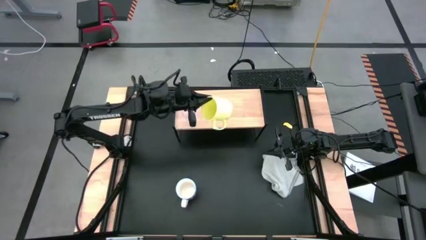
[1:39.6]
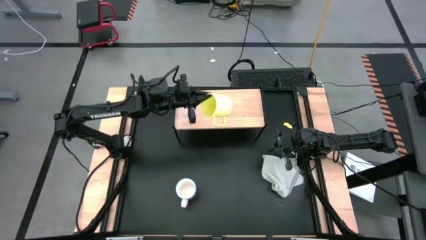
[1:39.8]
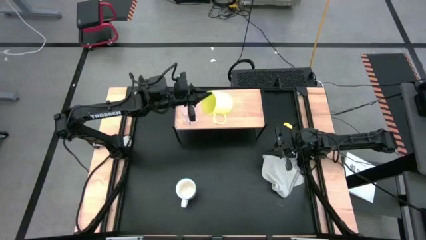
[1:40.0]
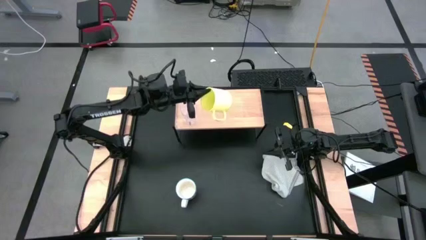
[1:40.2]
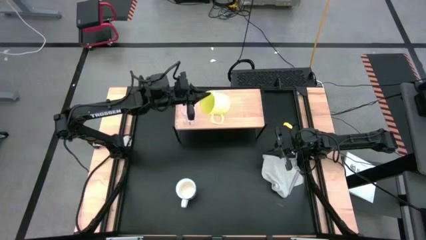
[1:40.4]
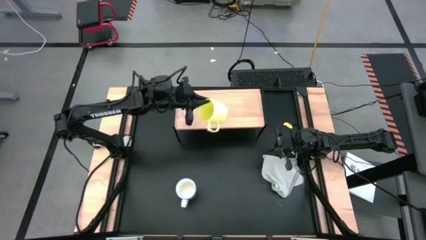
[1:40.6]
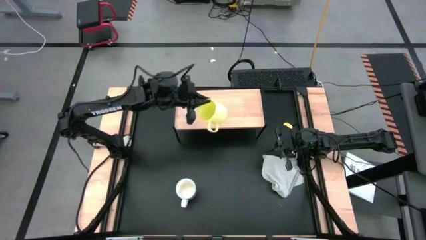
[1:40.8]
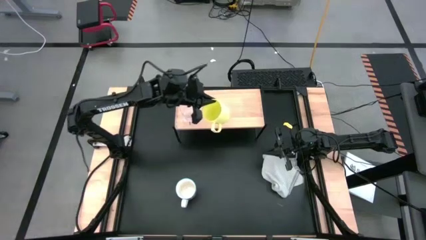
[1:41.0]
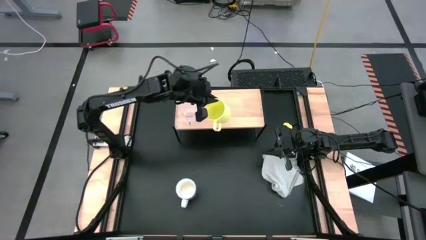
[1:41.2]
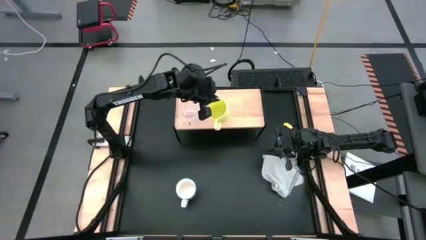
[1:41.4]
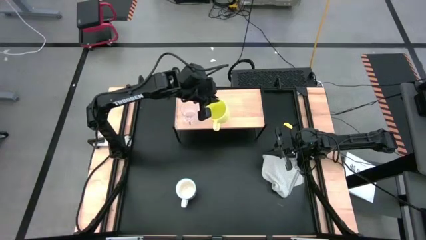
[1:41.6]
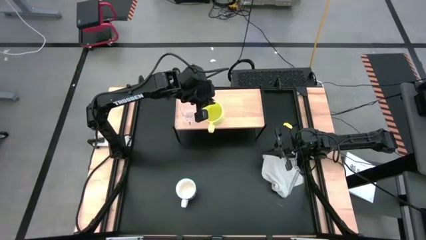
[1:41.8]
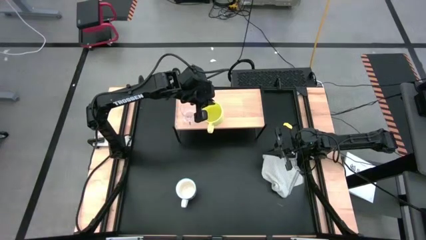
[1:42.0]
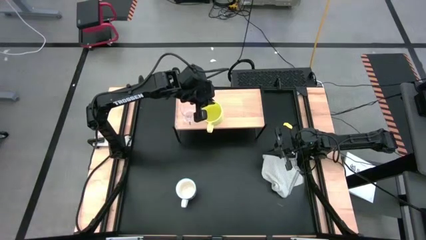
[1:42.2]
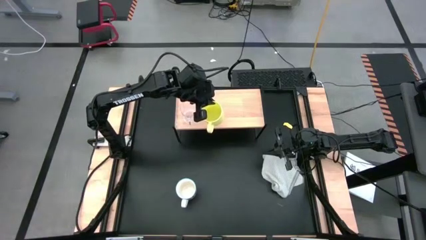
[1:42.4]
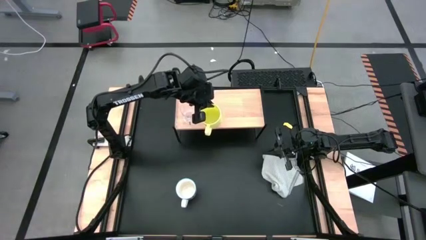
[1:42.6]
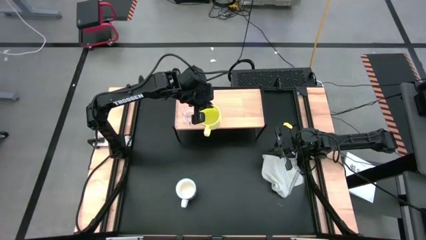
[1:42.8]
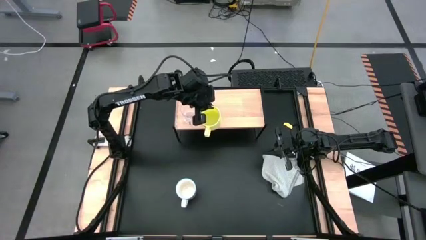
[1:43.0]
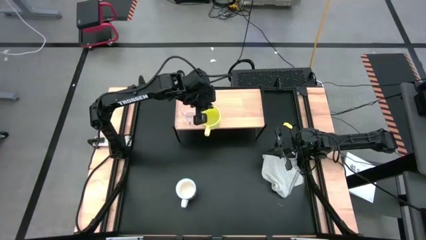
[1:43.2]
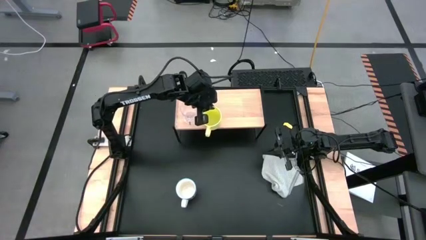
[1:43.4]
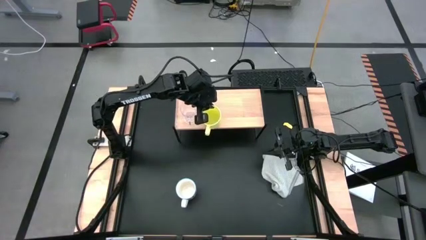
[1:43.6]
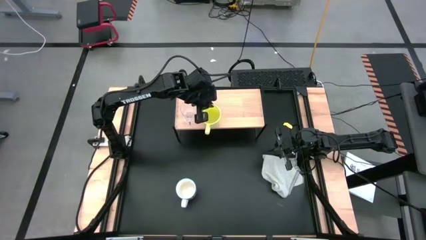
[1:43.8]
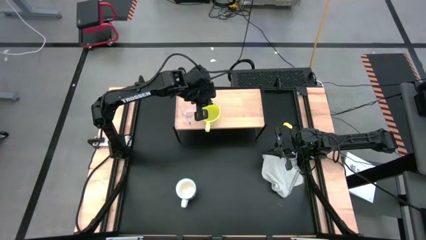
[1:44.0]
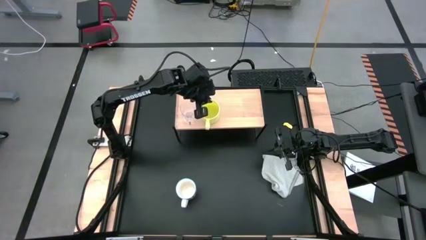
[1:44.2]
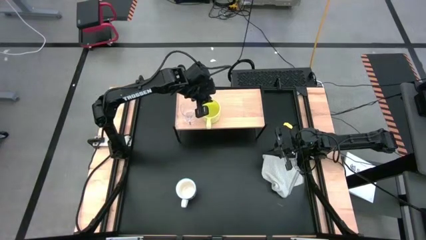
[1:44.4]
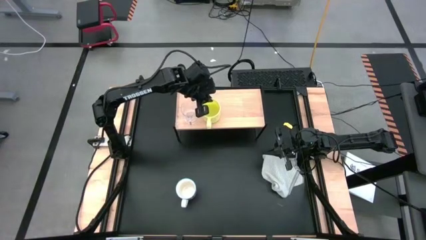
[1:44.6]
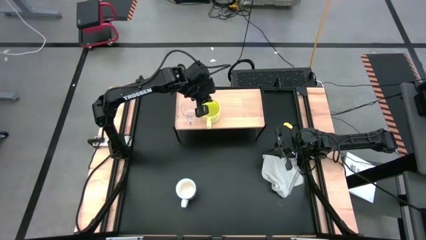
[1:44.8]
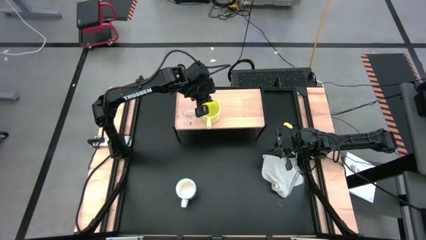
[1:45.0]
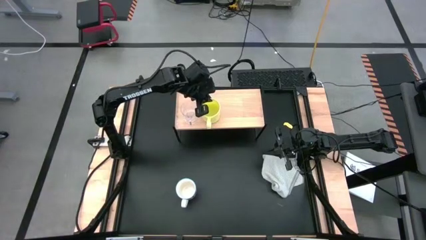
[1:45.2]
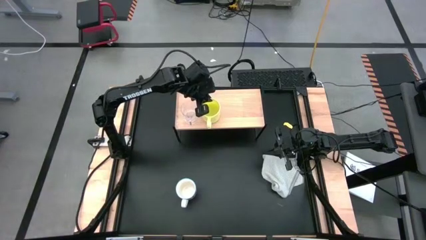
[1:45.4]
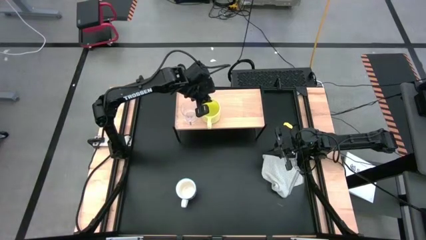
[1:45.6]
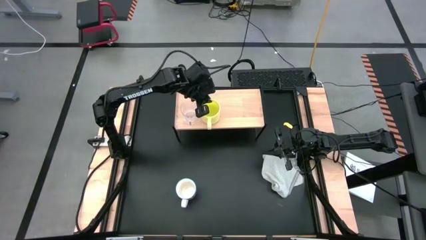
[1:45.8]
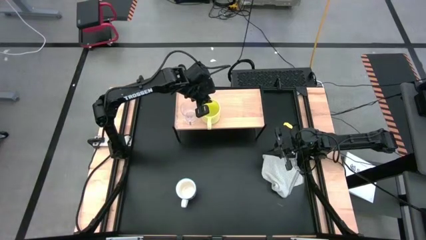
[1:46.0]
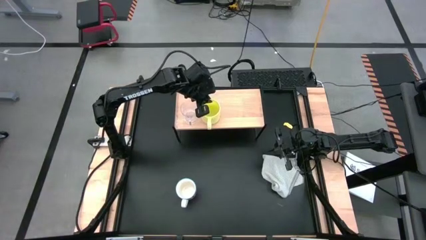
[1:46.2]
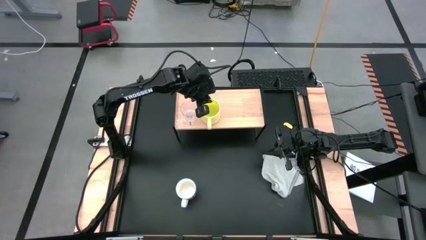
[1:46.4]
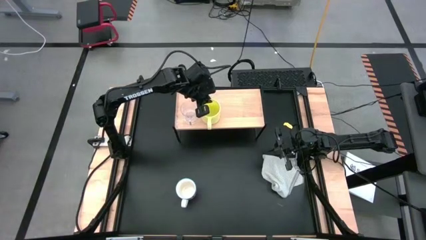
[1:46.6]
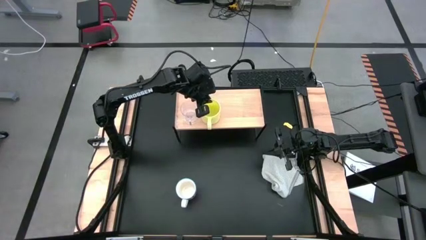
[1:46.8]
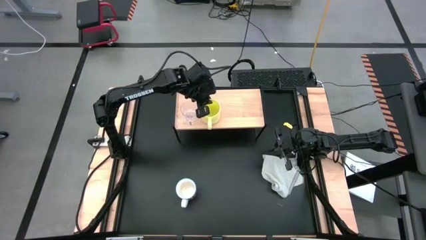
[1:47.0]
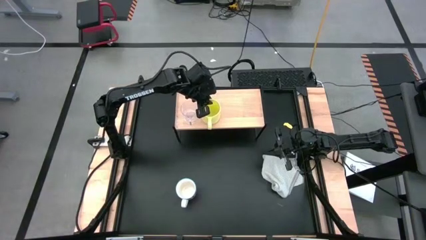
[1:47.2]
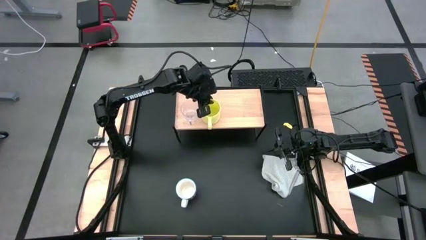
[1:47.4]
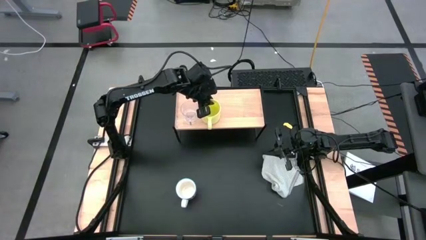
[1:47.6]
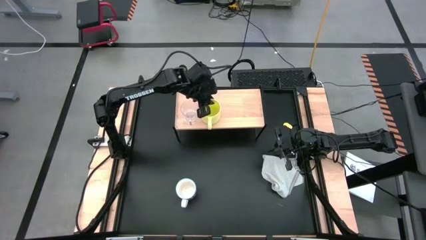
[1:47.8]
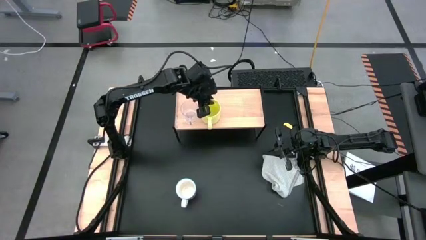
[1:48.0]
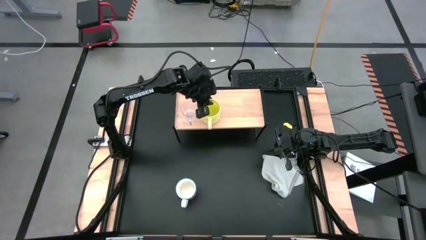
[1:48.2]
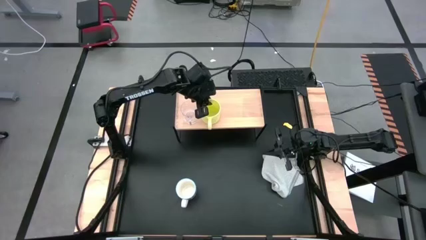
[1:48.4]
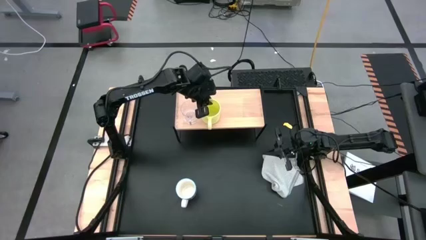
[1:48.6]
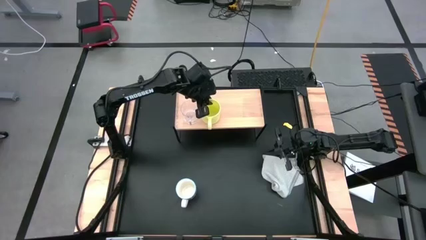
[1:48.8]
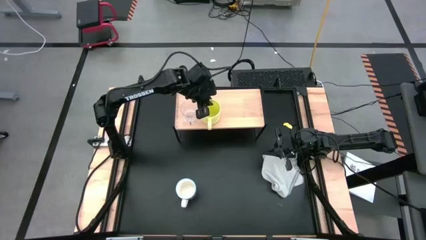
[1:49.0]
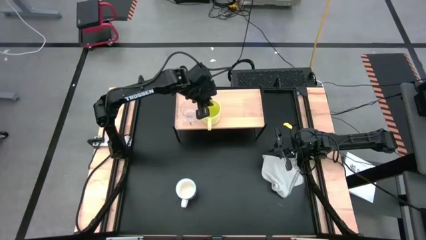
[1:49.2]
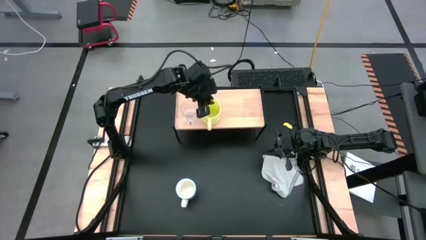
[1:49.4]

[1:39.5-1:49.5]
Task: Stack small to large cups/mugs on shelf
Put the yellow mug on the shelf

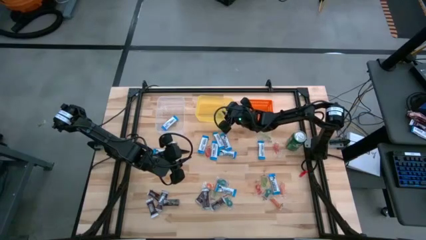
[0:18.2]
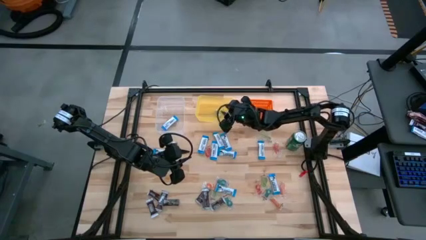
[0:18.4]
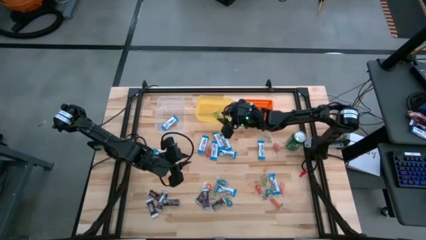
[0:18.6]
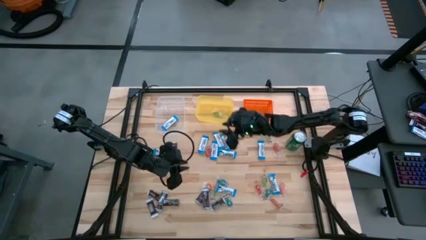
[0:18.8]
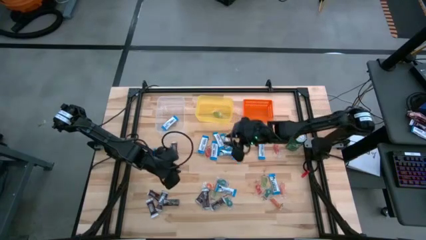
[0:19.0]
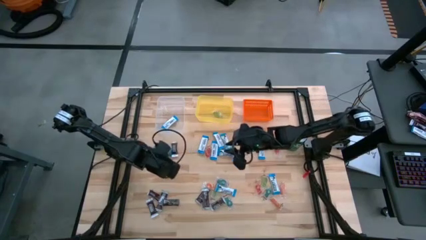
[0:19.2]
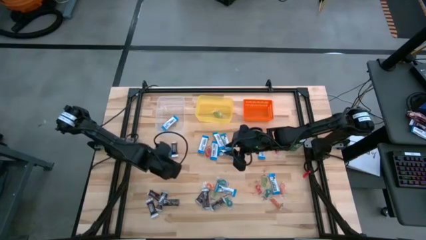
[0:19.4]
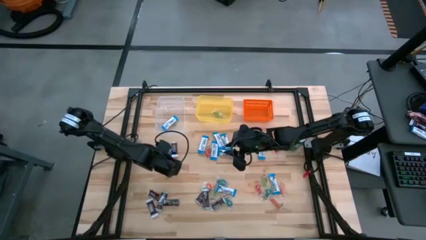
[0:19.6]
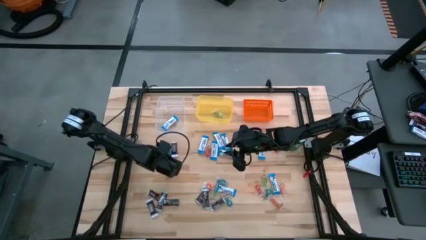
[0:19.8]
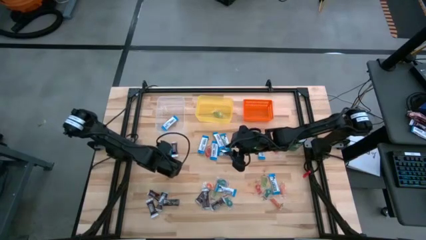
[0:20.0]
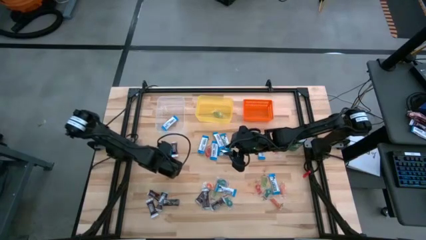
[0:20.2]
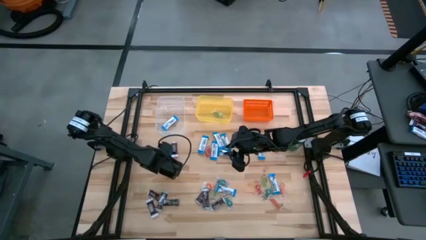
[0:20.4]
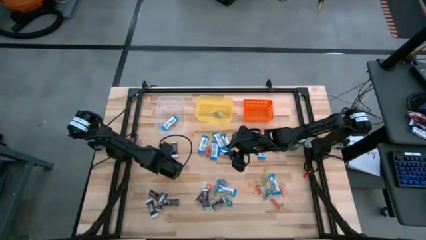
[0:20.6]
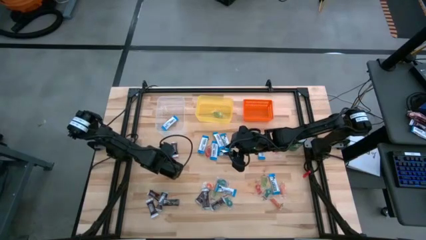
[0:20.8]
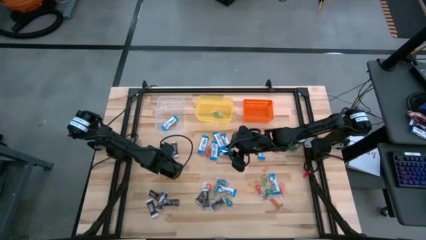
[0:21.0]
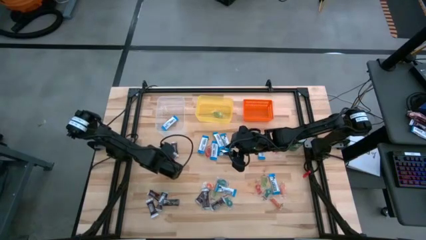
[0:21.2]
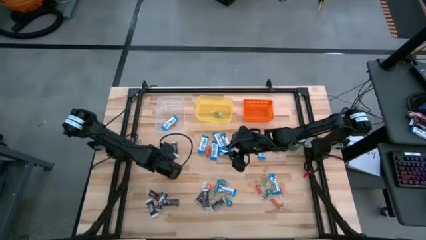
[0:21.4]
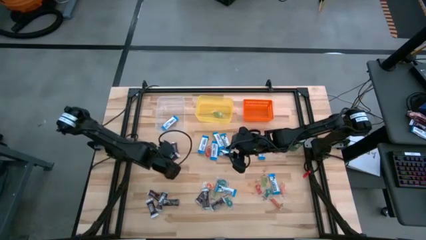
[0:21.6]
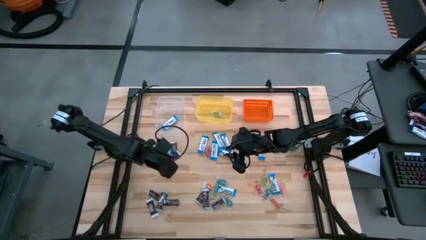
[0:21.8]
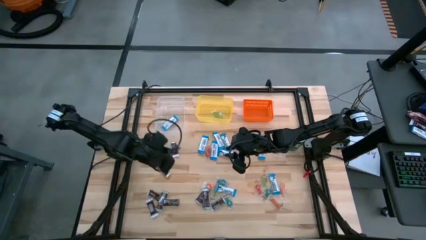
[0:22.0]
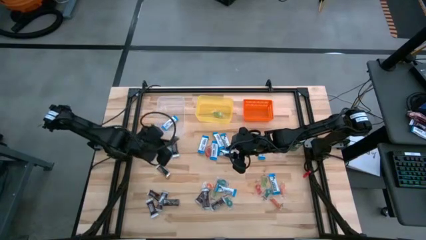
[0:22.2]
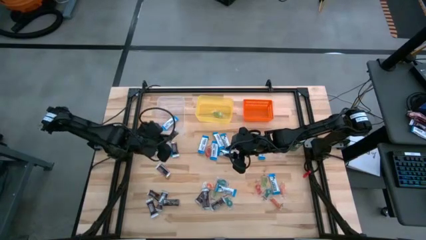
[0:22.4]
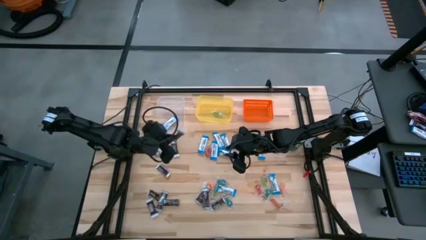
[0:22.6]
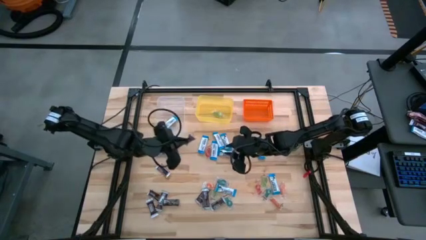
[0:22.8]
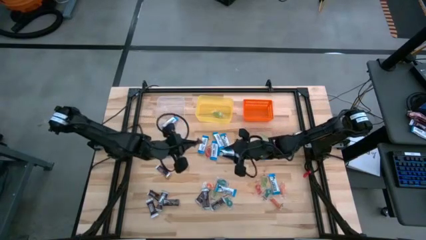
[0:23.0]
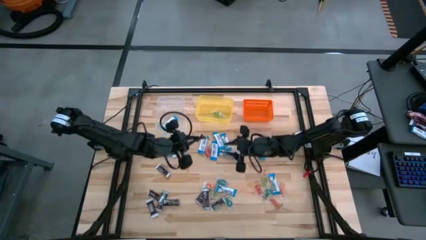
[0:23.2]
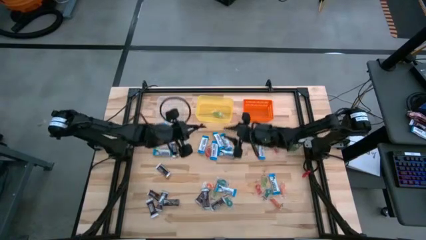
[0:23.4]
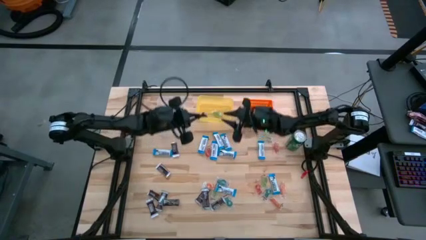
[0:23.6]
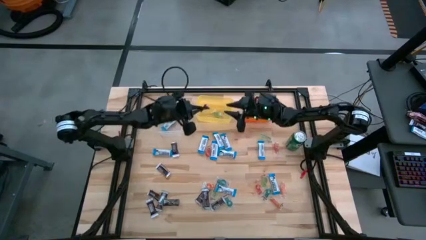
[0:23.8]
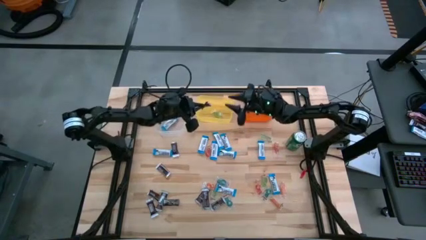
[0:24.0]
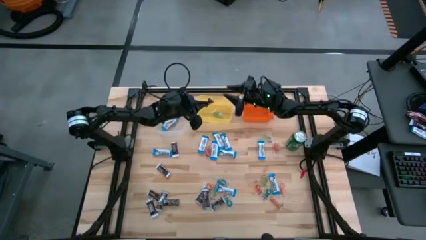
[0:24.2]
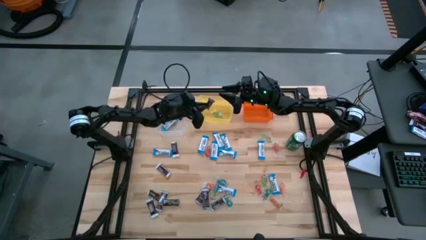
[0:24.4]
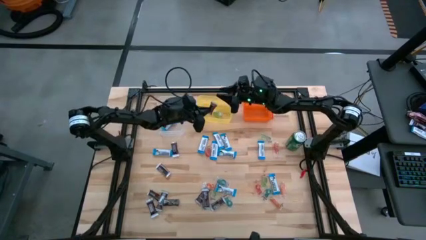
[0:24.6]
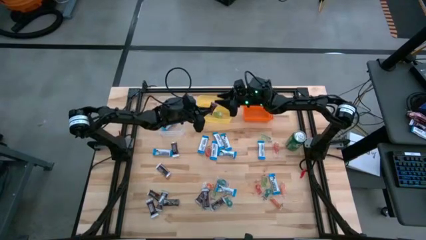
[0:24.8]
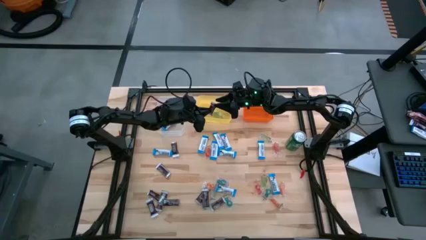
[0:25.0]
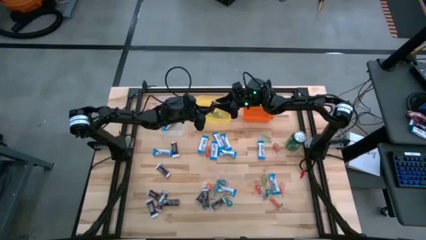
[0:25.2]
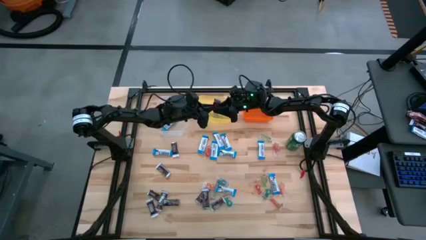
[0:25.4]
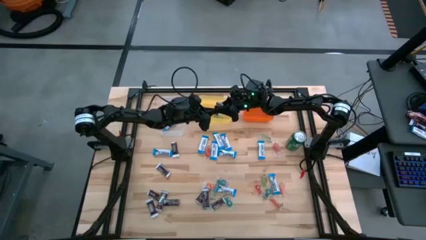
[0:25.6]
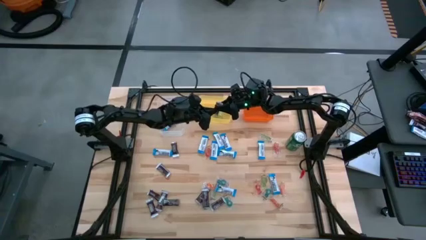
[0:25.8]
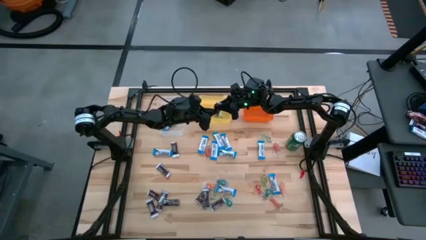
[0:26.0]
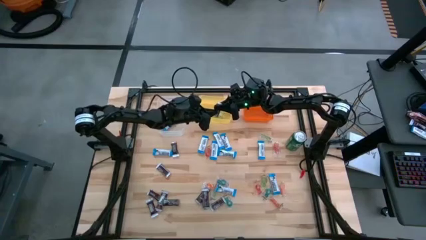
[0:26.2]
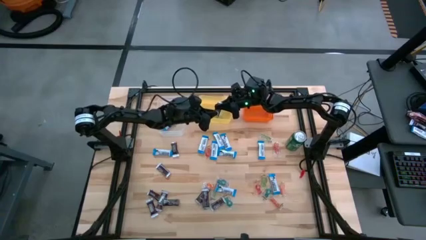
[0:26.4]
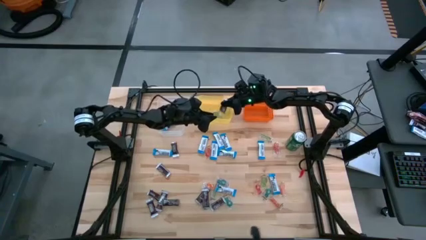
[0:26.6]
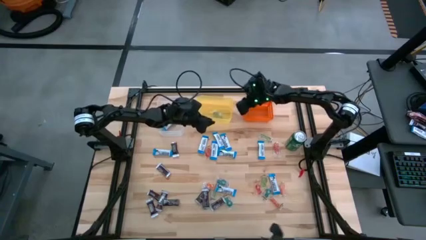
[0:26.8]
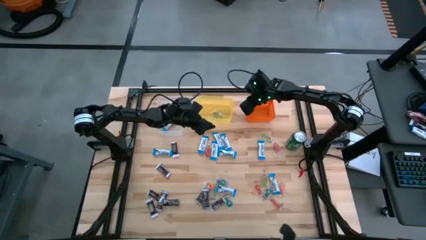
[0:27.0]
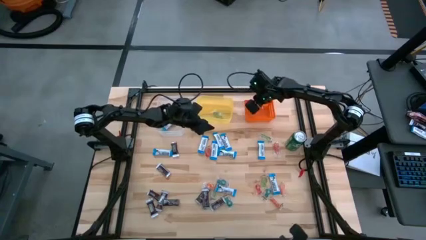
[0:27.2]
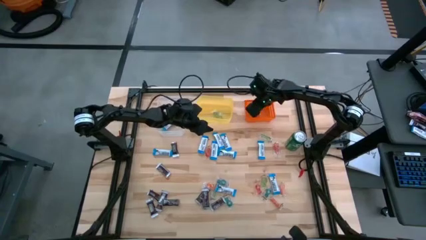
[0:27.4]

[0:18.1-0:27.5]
Task: Sort candy
Put the black chocolate into the orange bin
